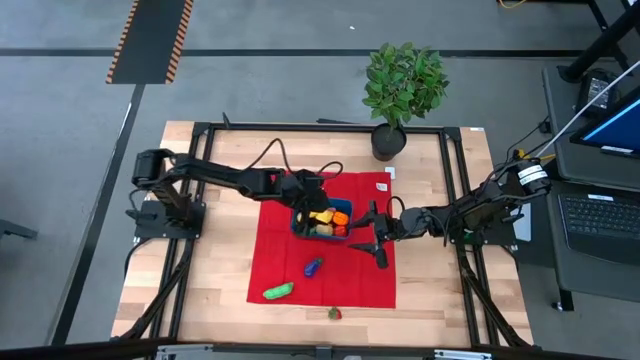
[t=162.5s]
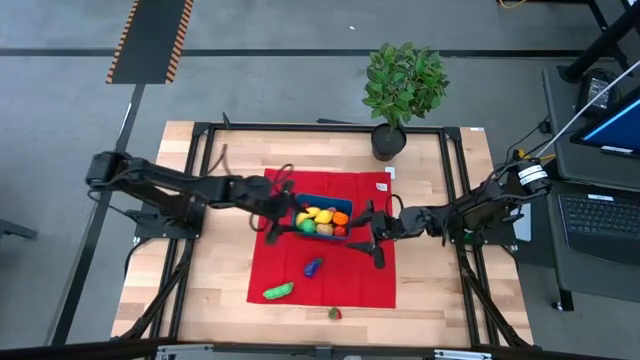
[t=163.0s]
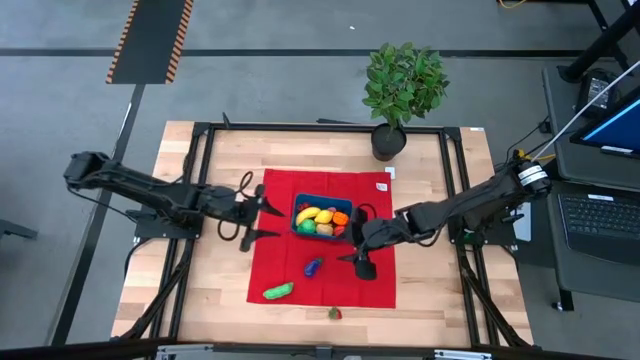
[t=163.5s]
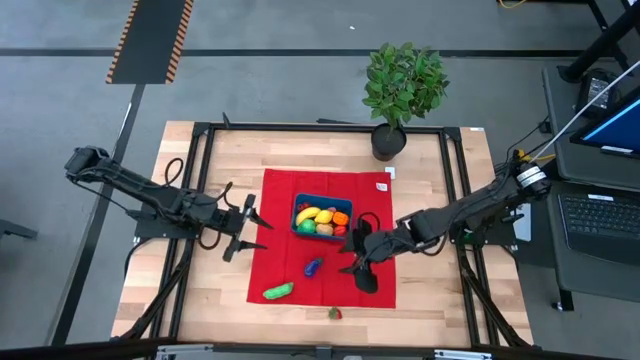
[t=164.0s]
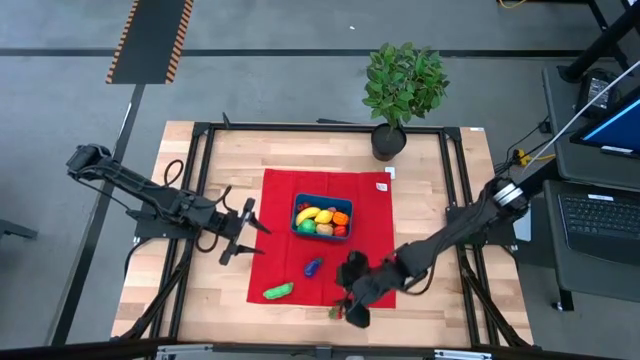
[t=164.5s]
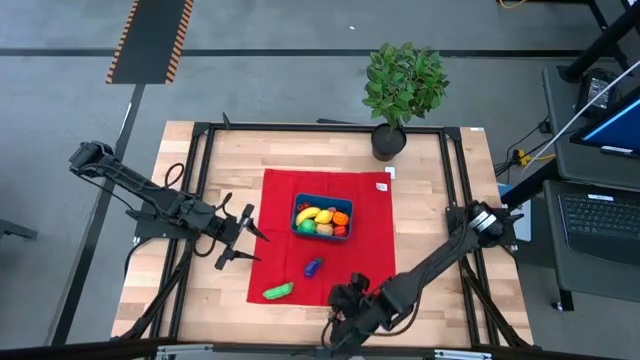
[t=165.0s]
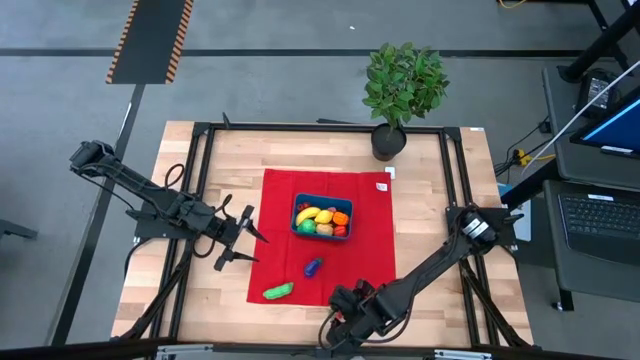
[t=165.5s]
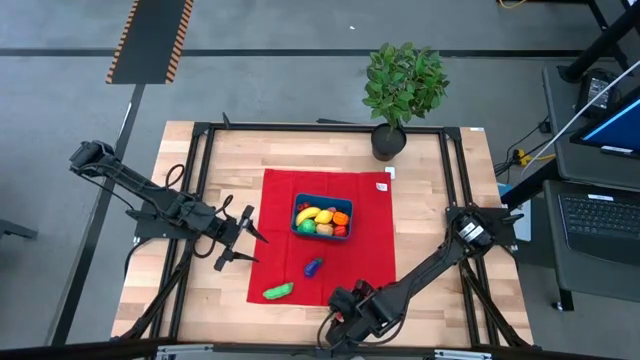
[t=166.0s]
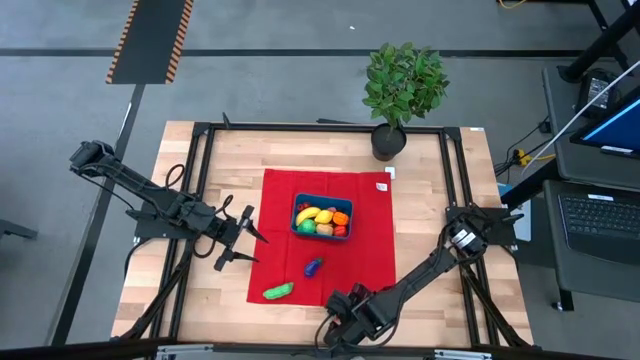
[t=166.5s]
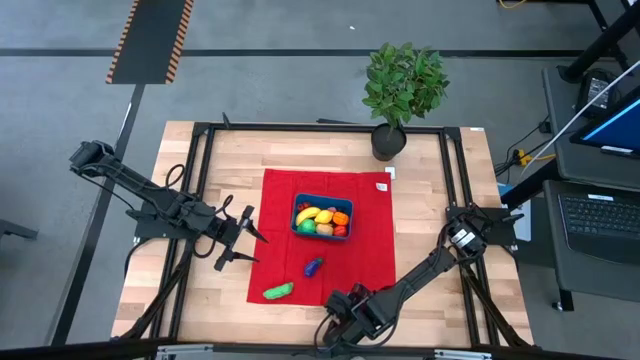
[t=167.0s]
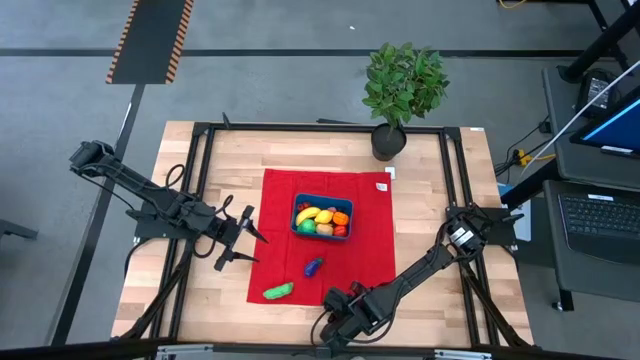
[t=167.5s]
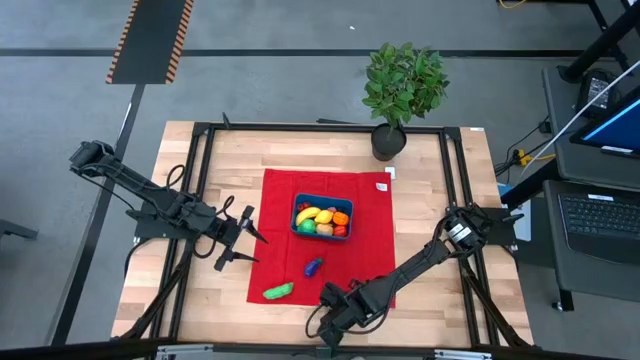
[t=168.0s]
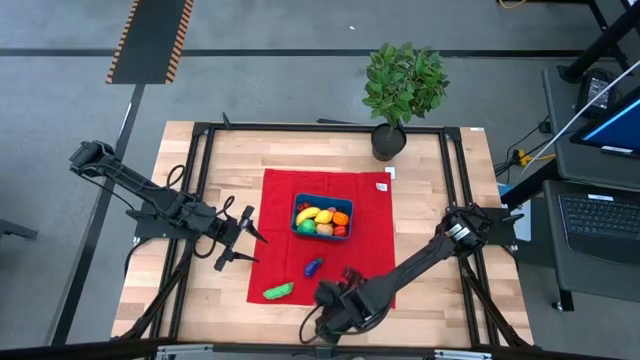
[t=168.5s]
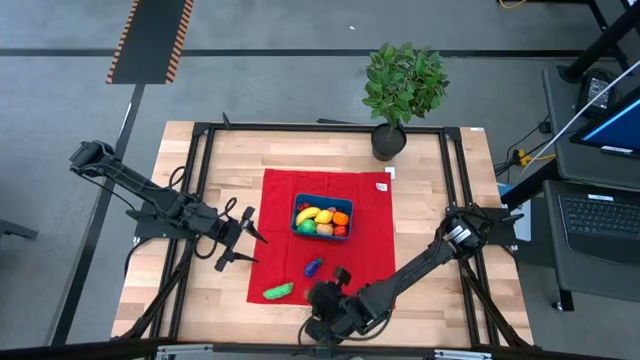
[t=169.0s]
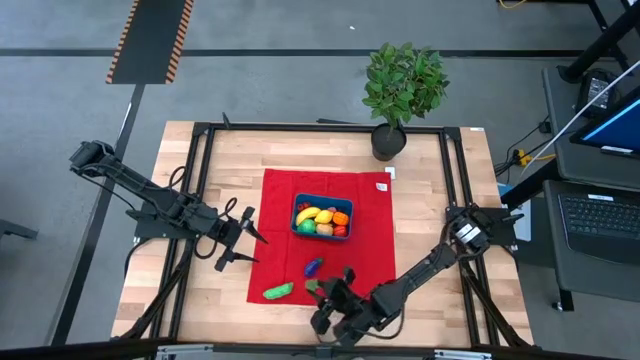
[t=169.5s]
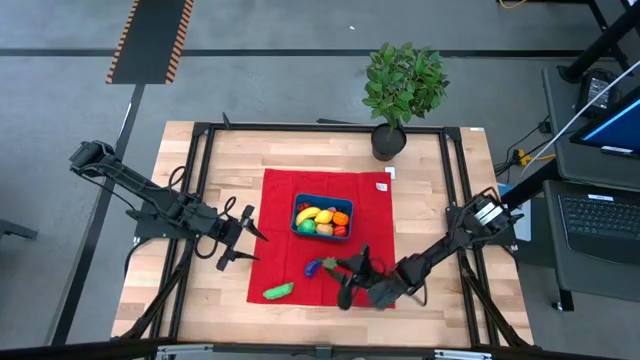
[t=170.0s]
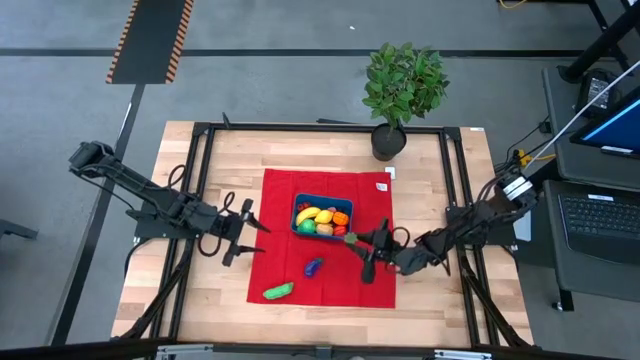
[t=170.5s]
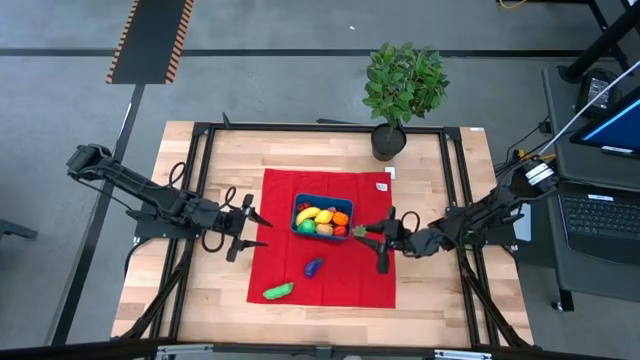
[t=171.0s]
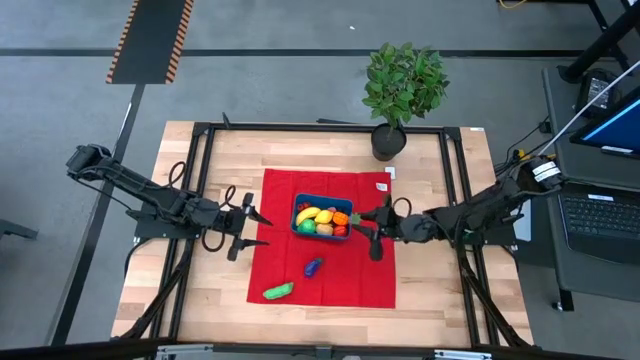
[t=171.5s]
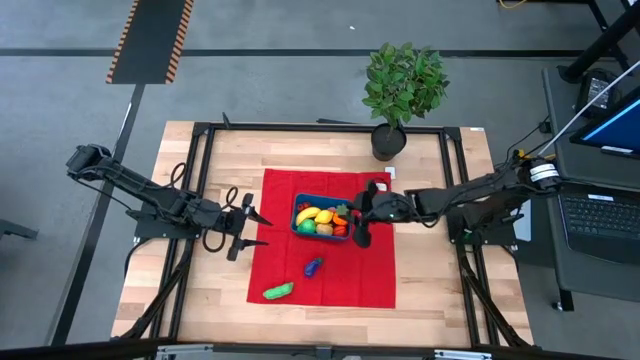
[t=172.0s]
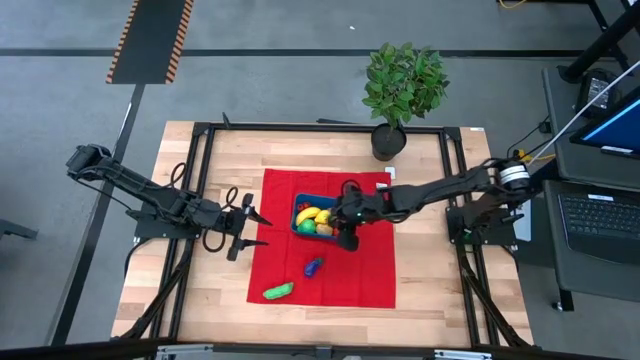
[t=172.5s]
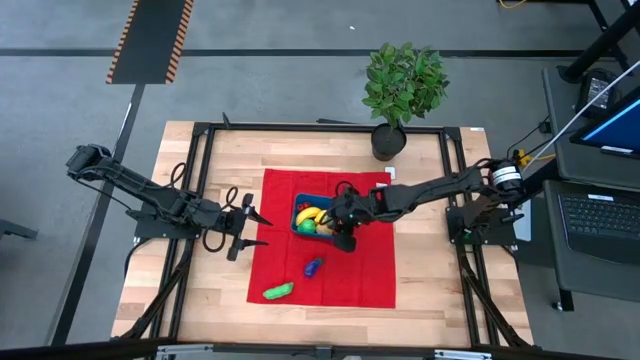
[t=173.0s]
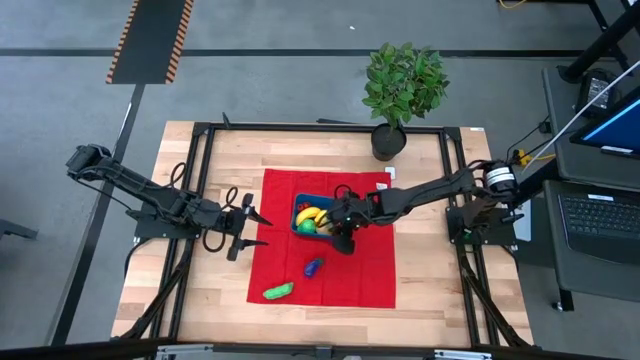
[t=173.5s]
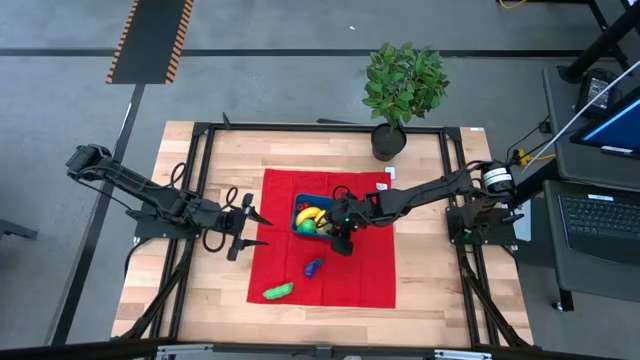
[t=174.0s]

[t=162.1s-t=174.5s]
Task: Pick and placing Produce into tupperware
Put the red strawberry into the blue bin

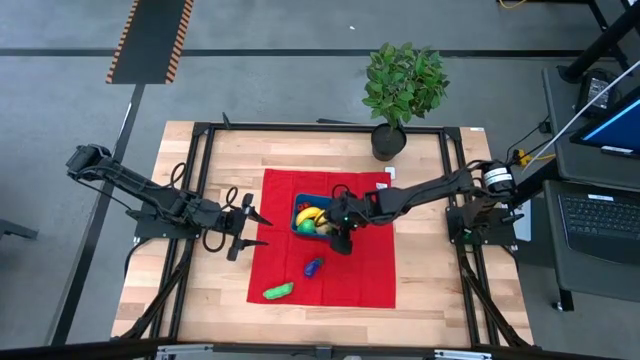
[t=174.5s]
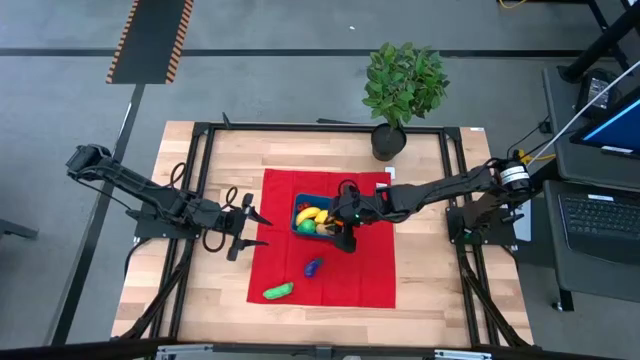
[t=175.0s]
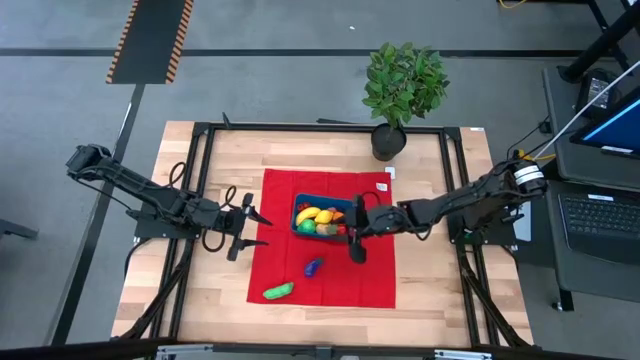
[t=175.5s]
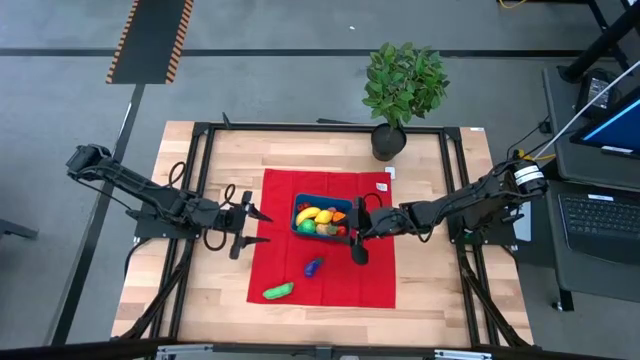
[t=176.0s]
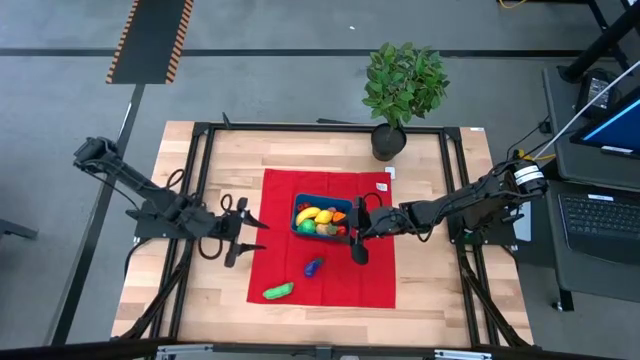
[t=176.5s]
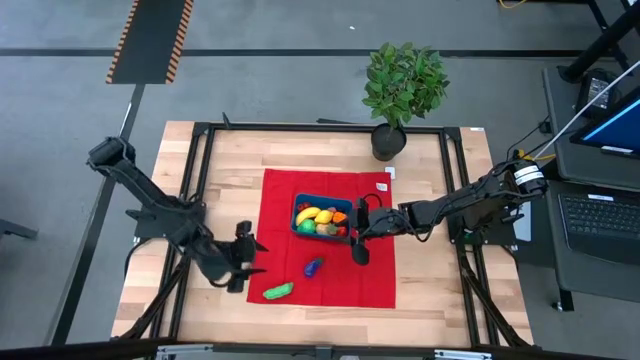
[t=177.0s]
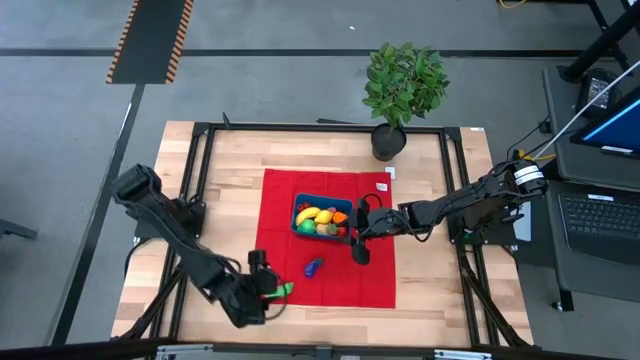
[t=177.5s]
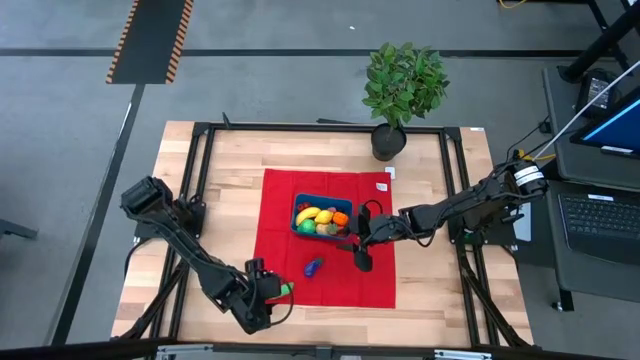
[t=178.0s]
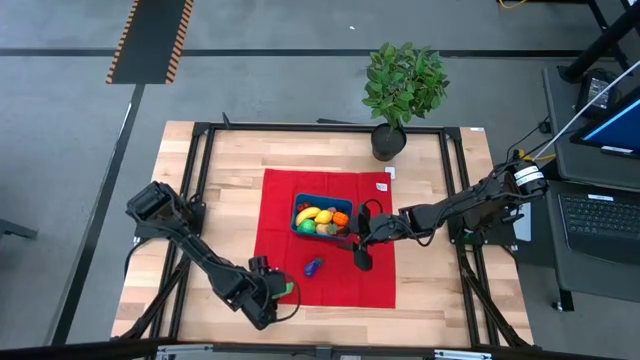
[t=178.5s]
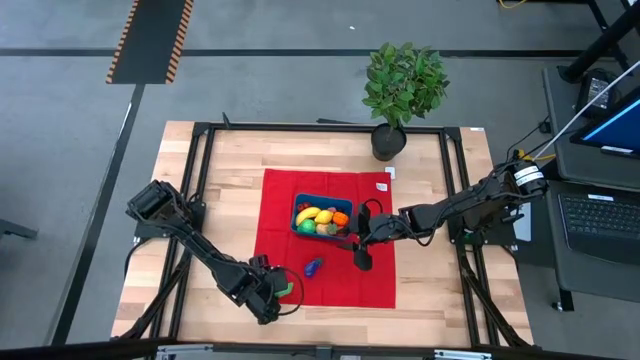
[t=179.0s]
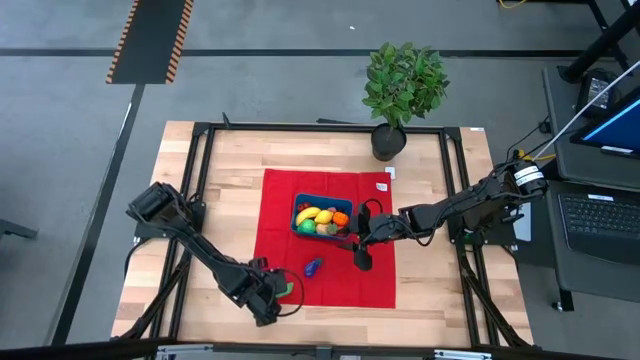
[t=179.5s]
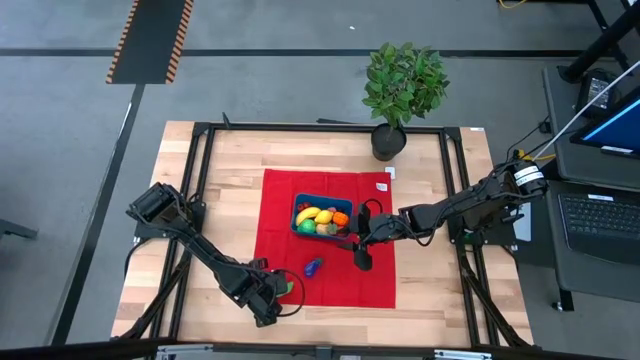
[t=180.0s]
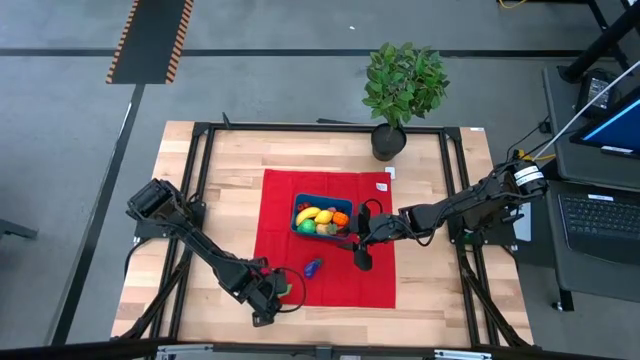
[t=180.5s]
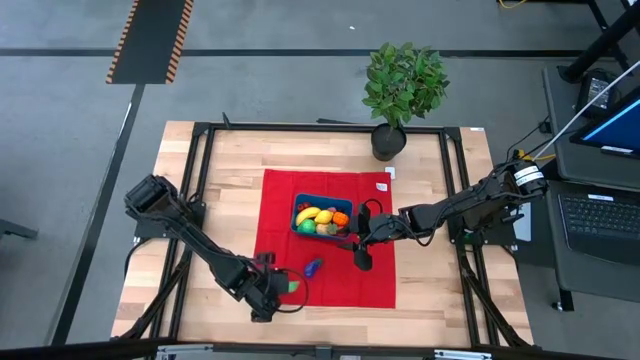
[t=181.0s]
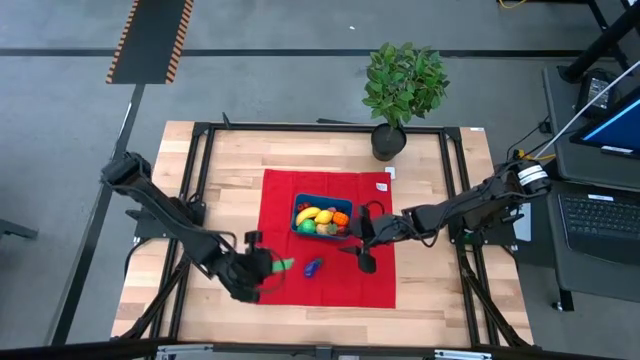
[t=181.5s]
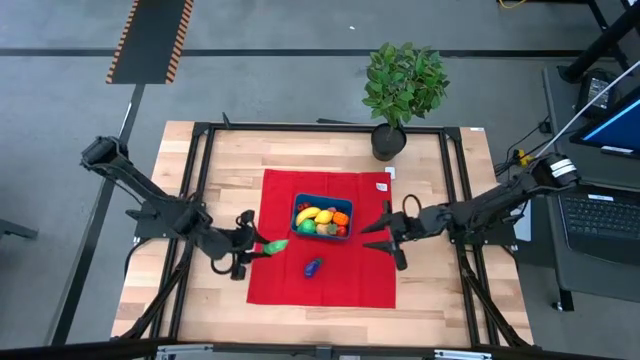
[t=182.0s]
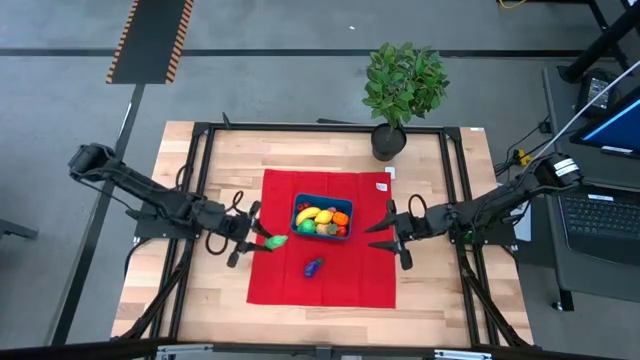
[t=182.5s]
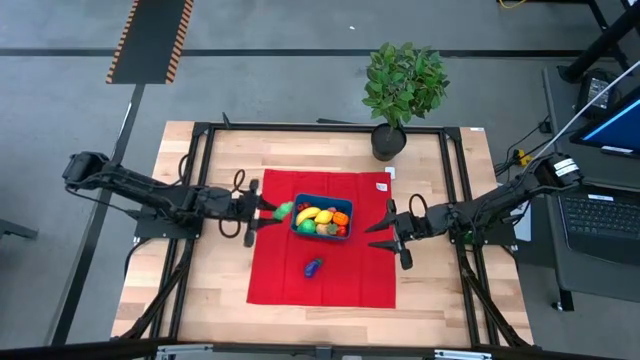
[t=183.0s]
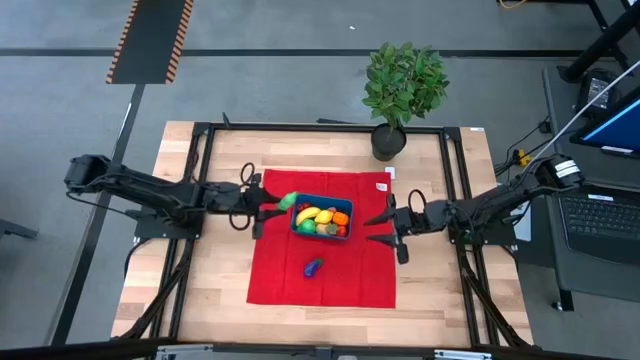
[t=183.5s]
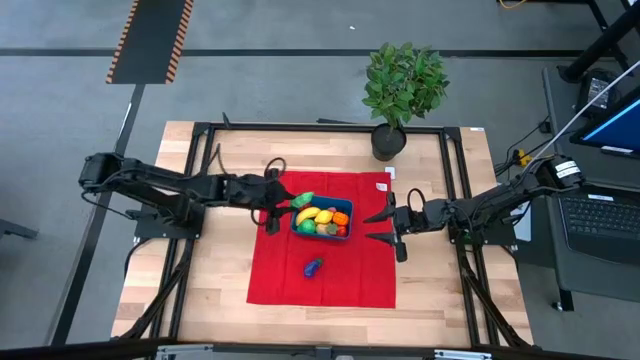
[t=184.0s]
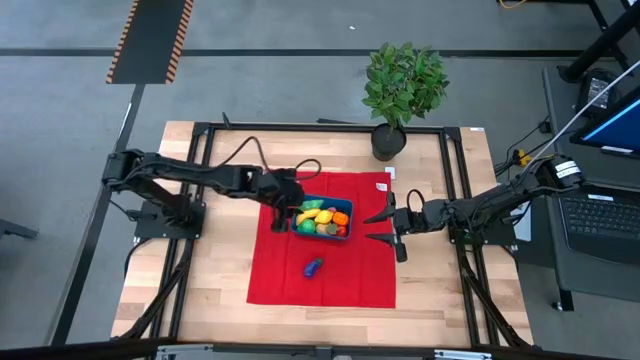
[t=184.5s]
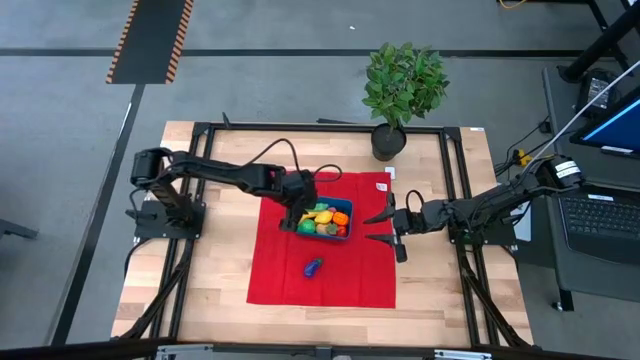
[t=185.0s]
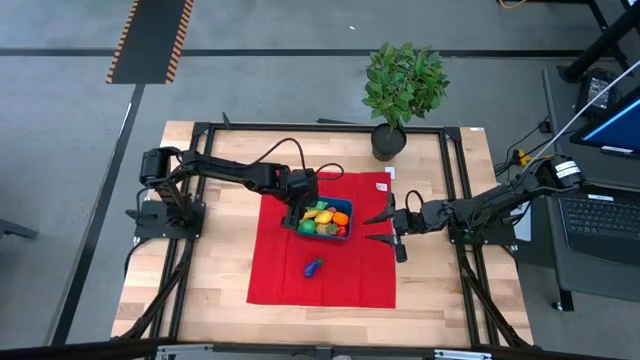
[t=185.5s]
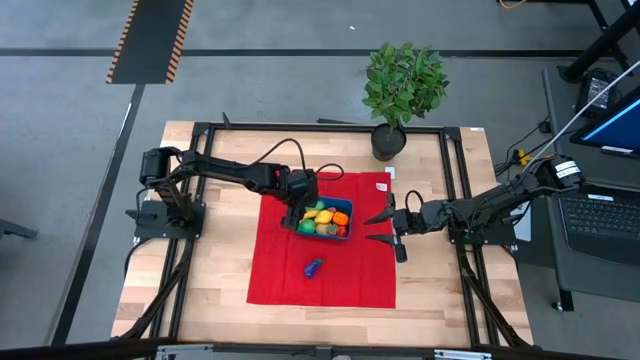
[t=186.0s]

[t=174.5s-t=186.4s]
Put the green pea into the blue bin
